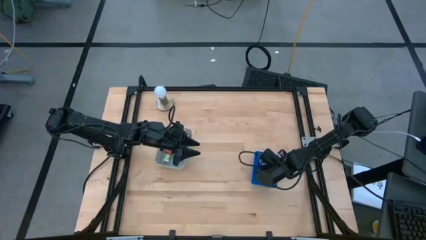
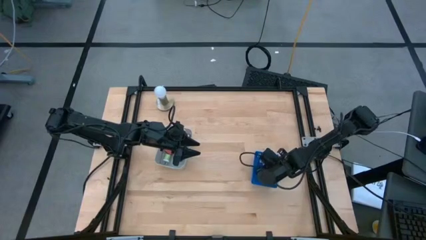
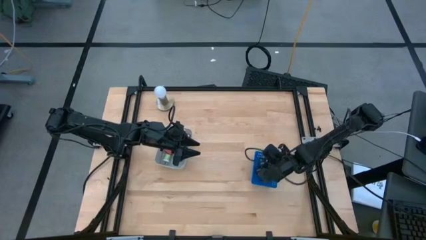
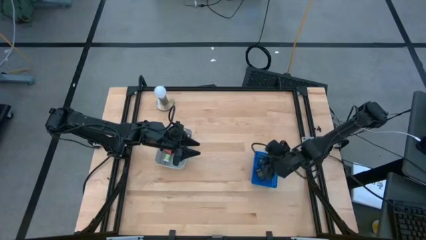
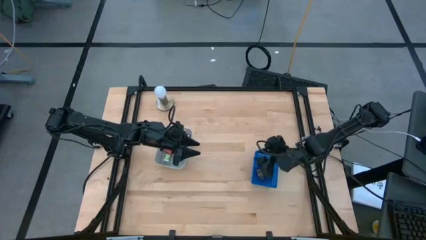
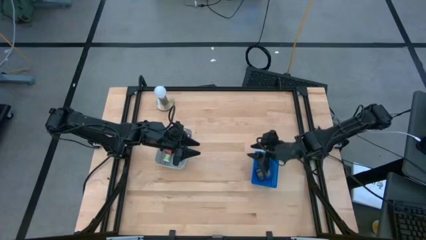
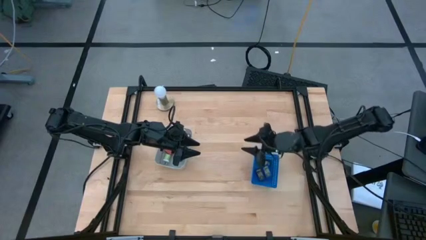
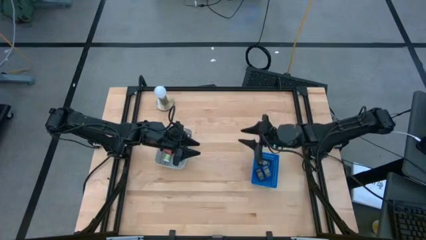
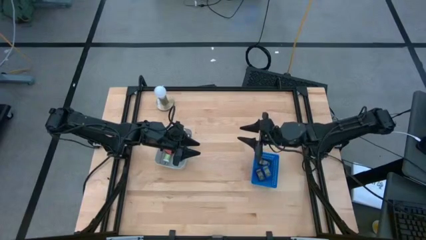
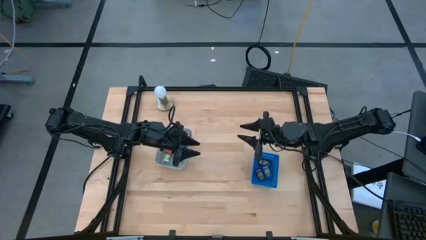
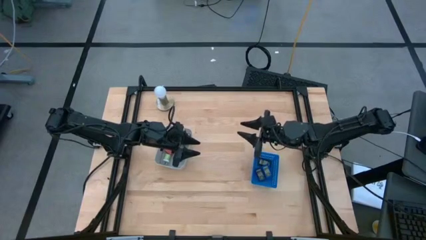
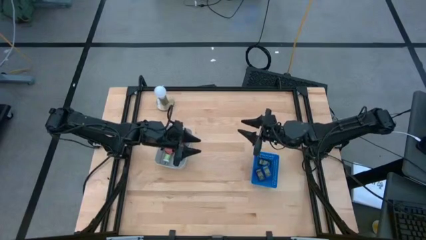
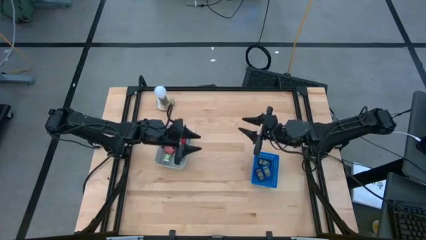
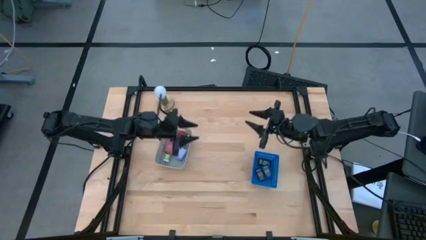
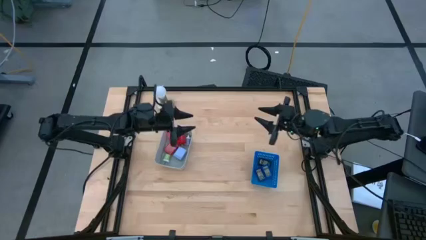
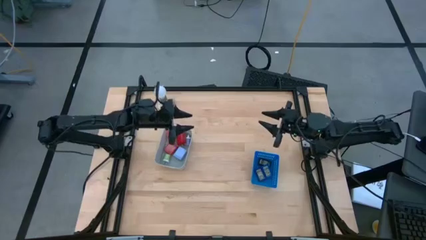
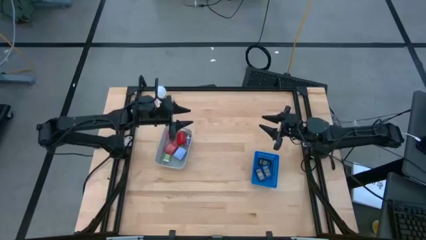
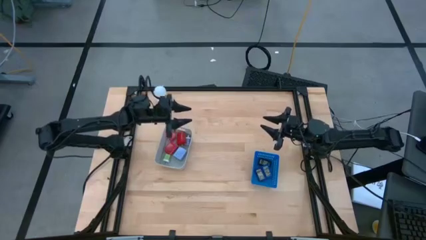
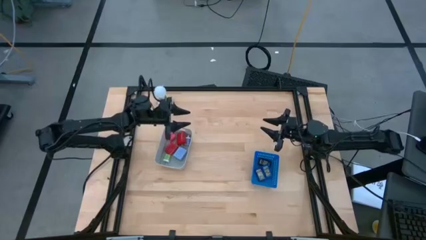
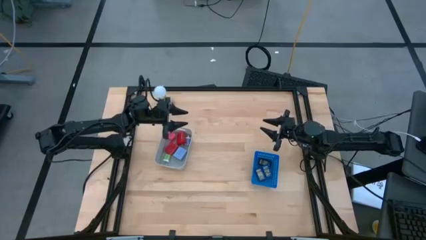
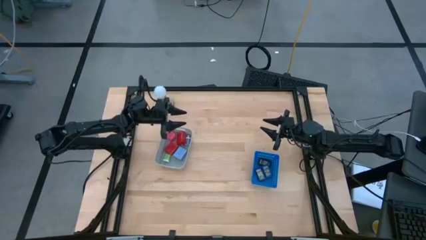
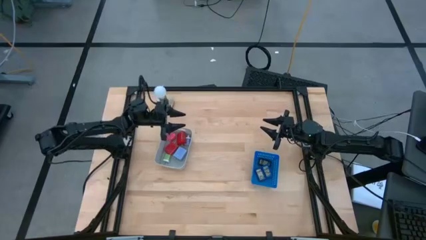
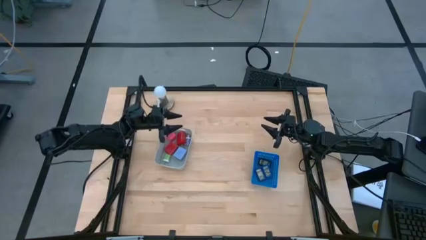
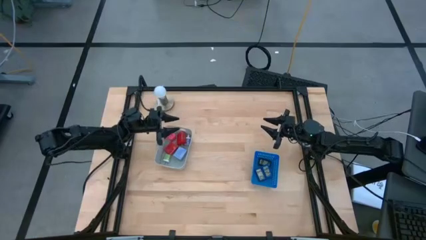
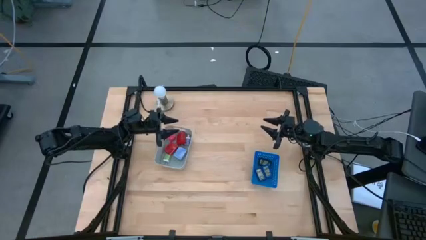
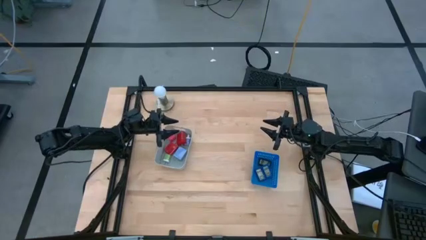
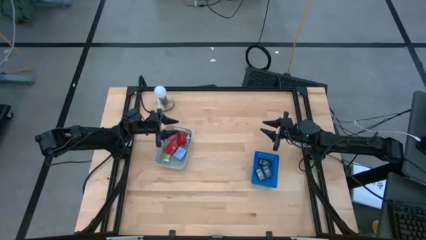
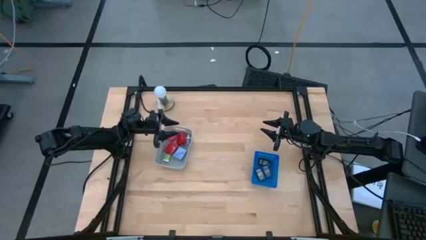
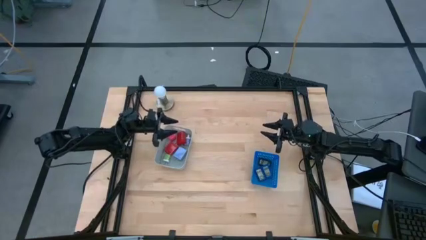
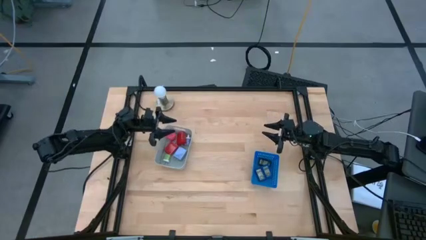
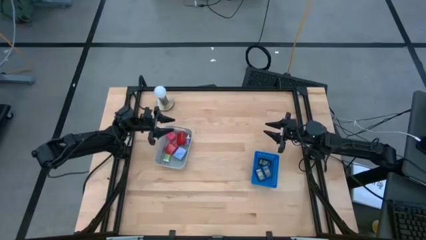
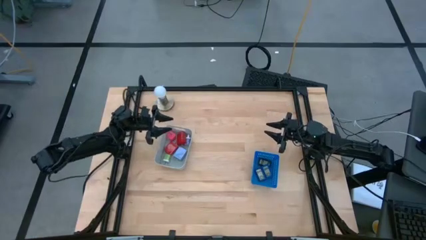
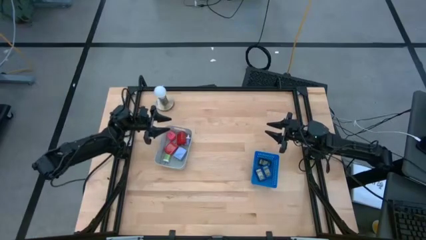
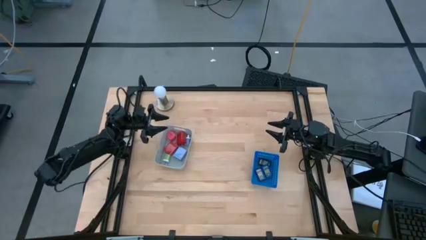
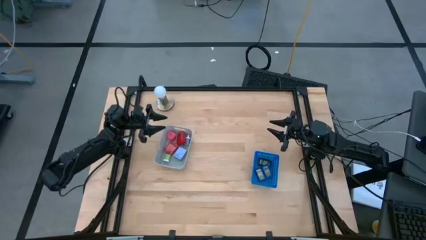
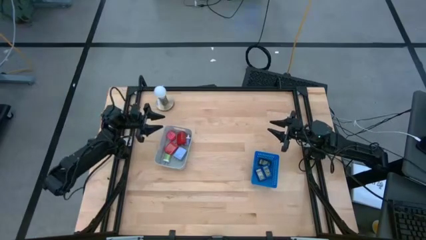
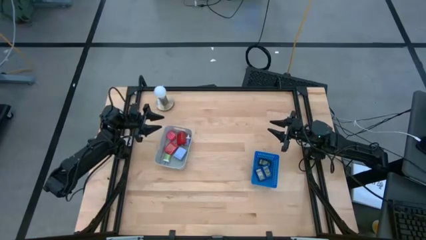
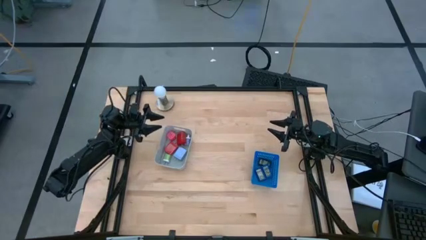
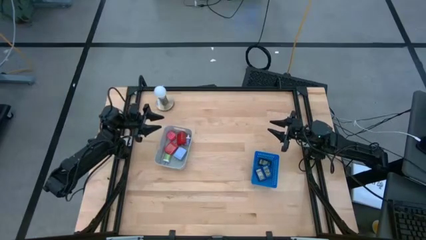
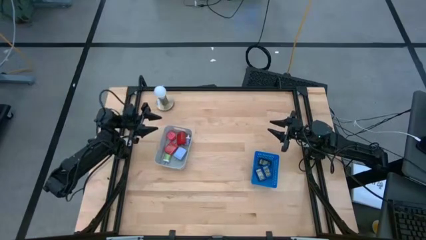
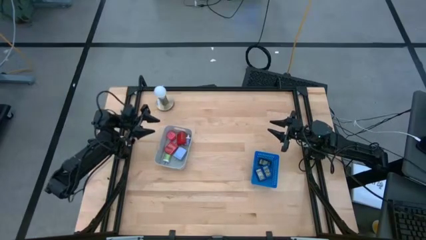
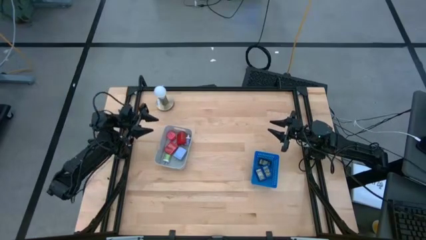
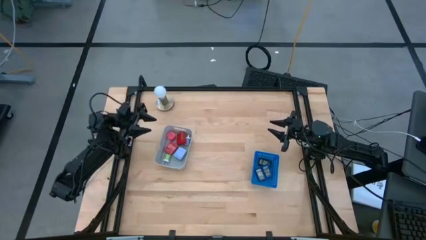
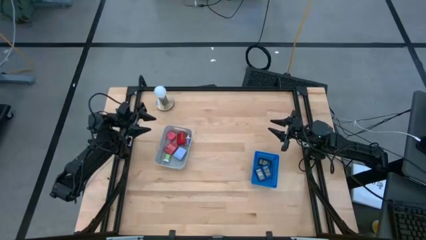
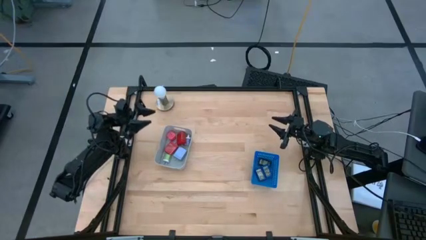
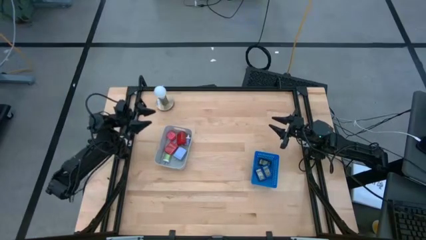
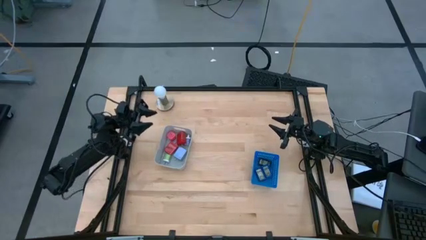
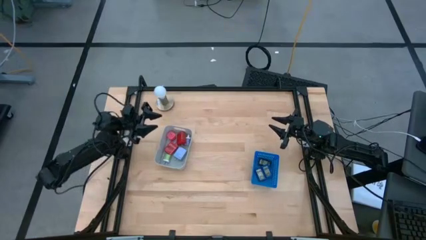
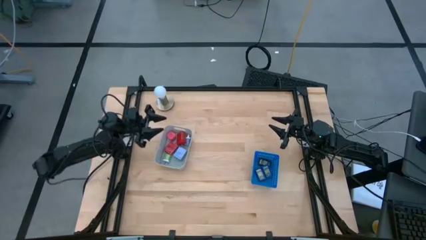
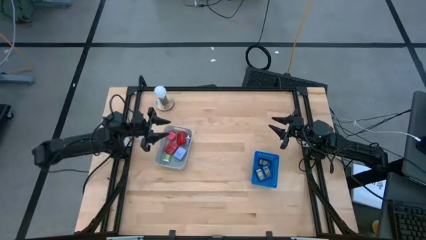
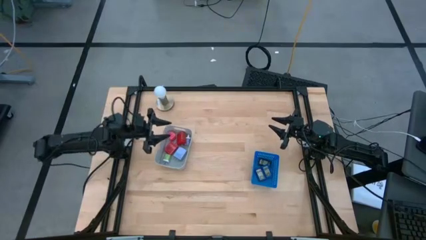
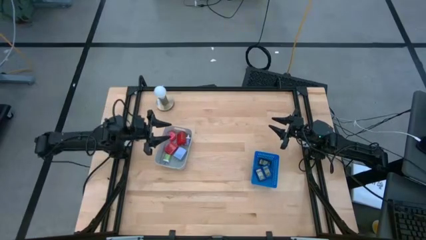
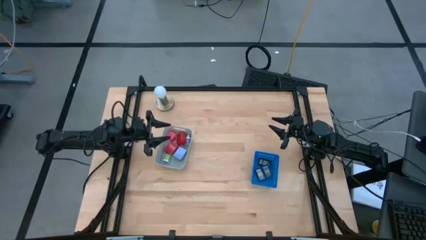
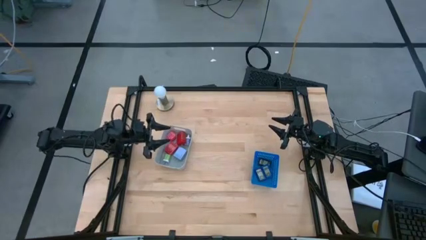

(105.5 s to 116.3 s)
Task: Pick & Place Office items
Return to Home Position

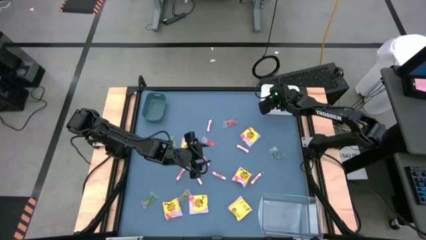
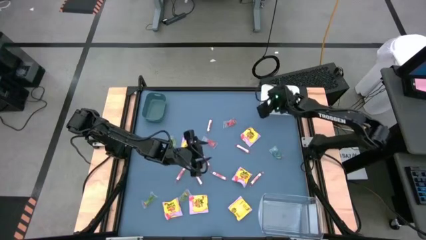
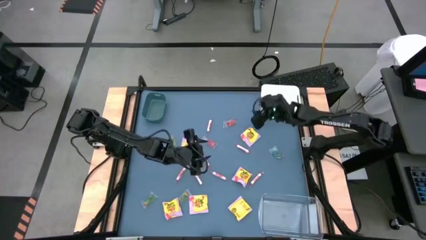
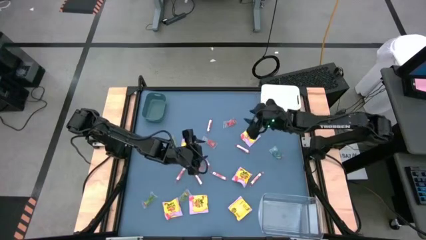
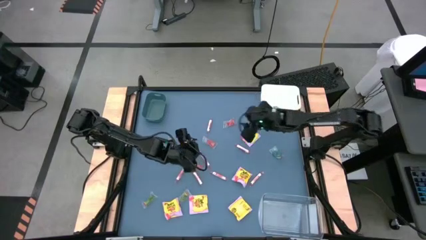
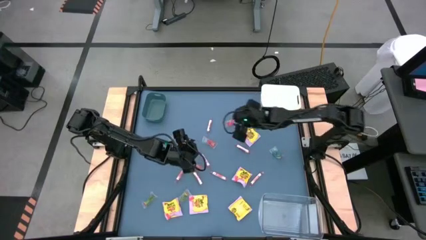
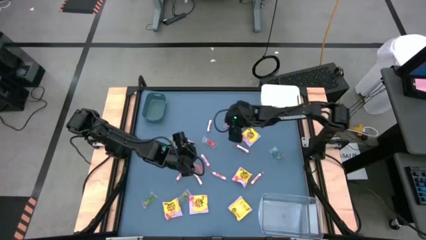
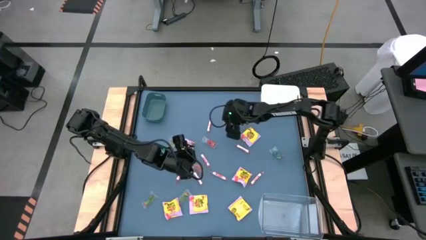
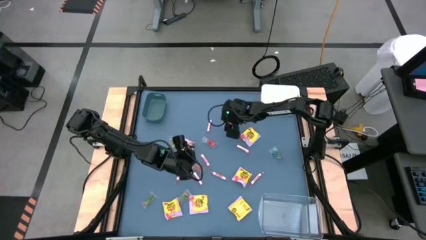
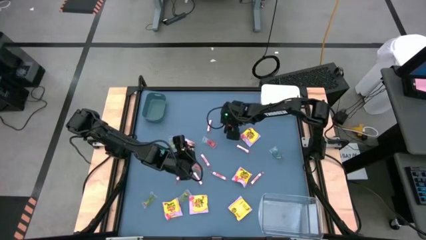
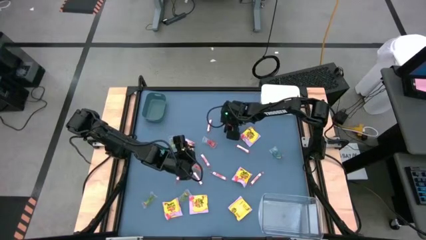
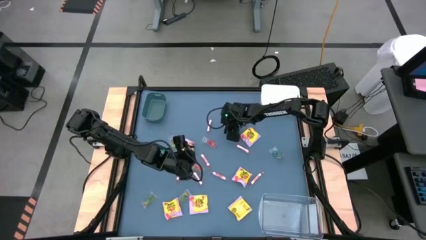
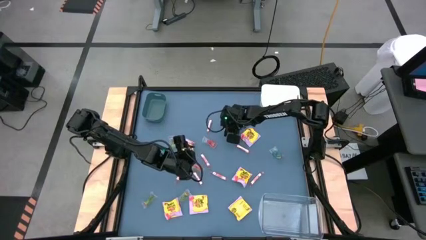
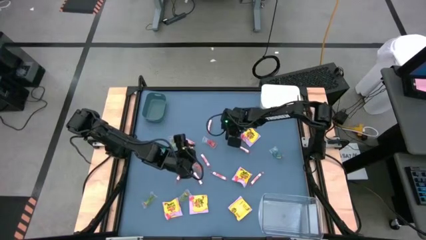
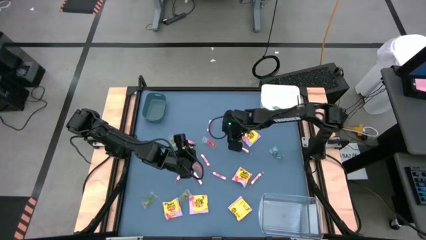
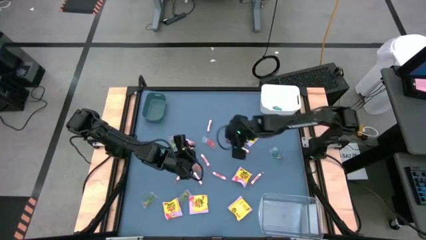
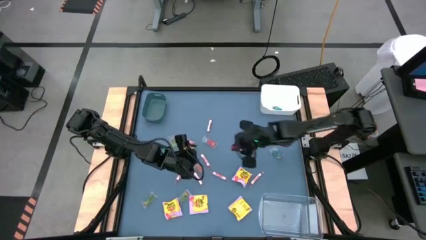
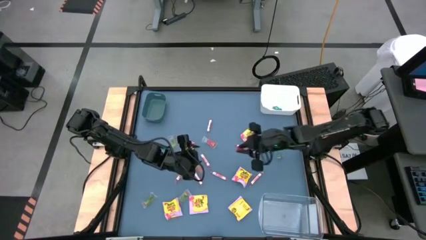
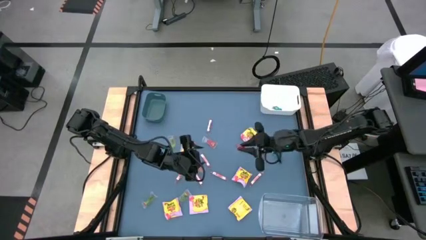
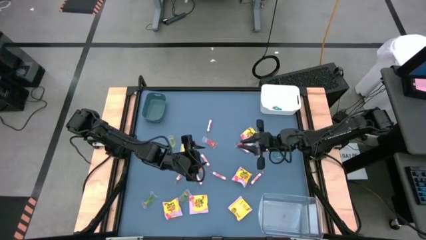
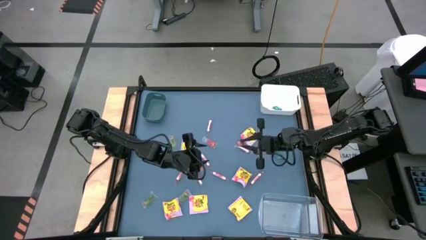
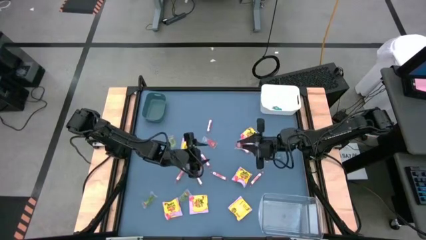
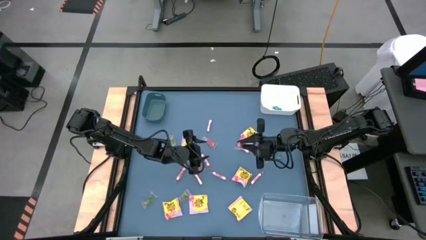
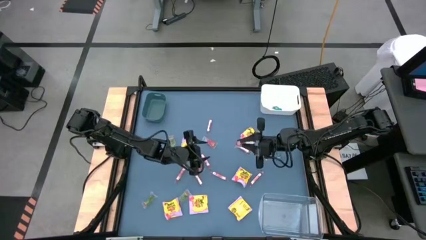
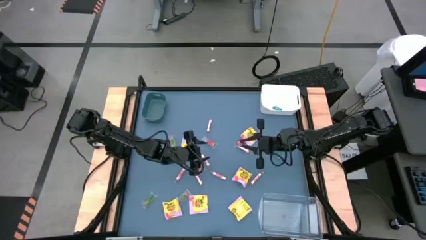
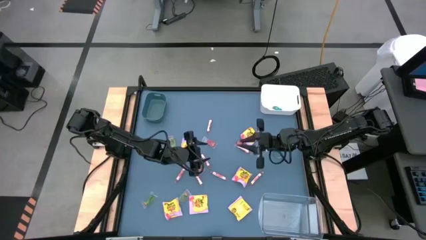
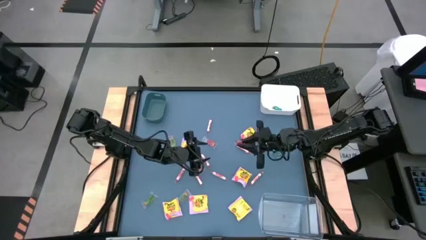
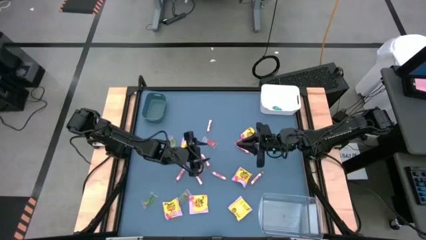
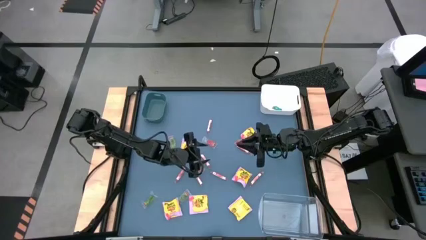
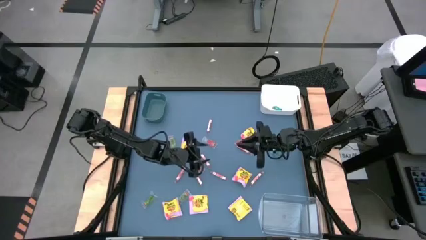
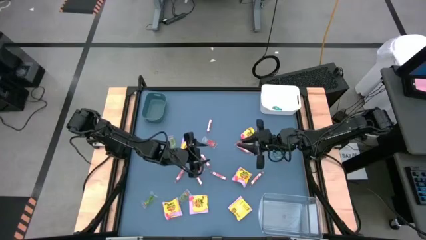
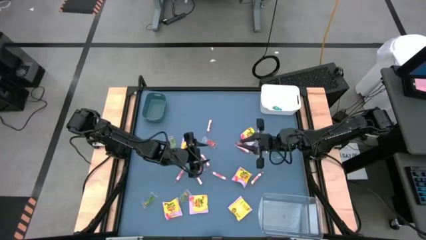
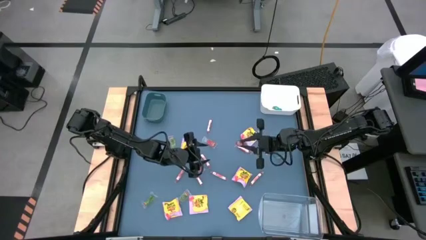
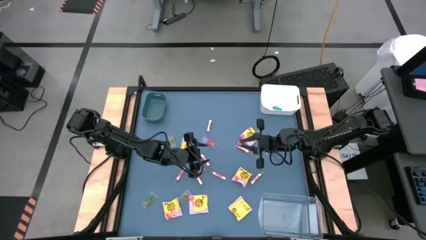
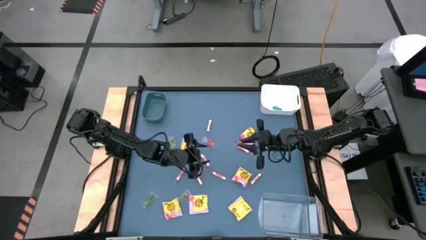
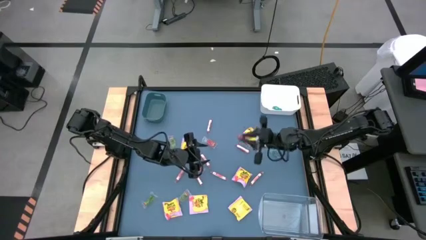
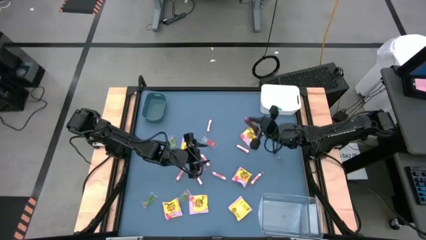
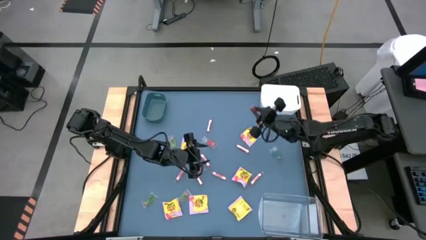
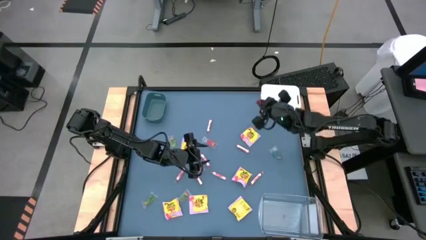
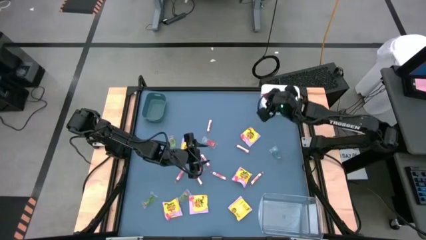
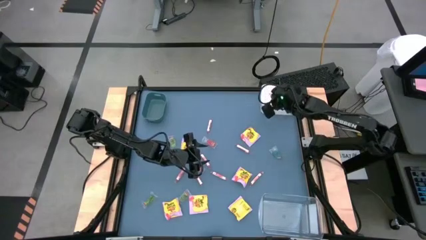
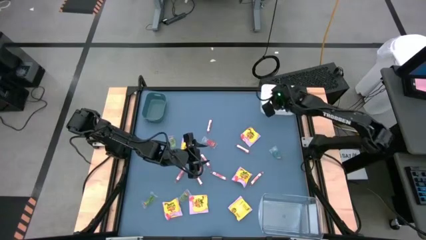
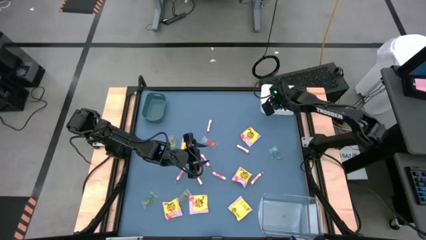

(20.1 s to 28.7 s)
Task: Sort candy
Put the orange gummy into the white bin
